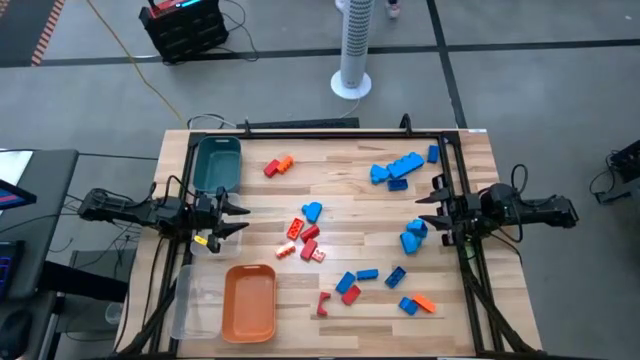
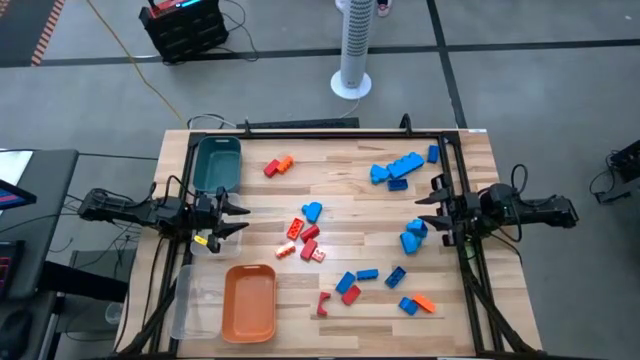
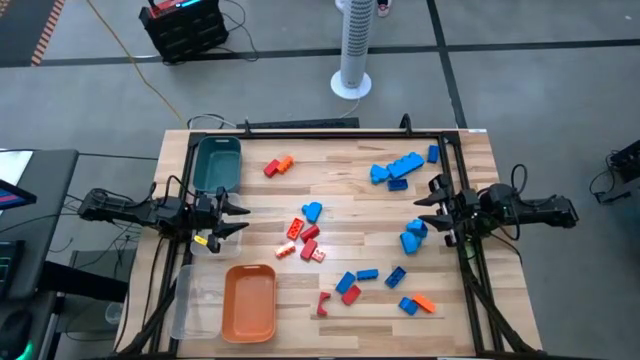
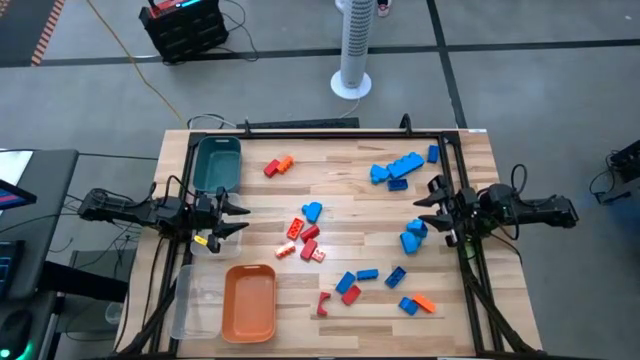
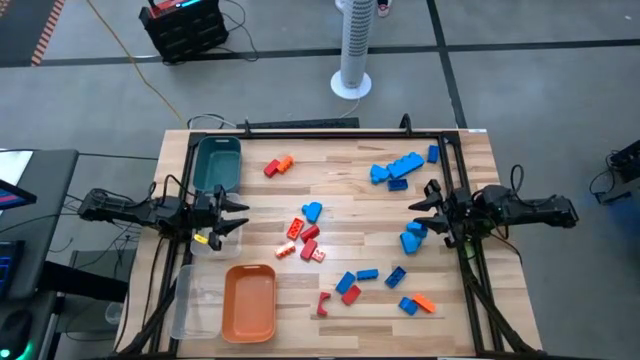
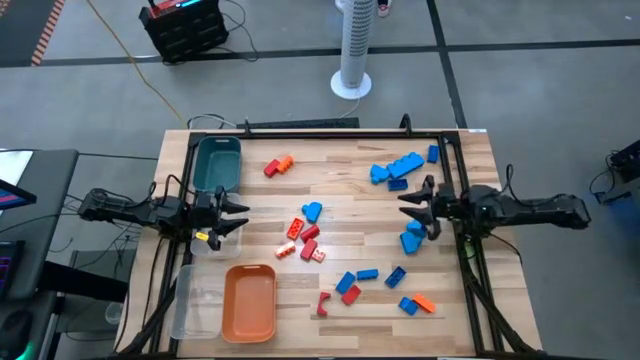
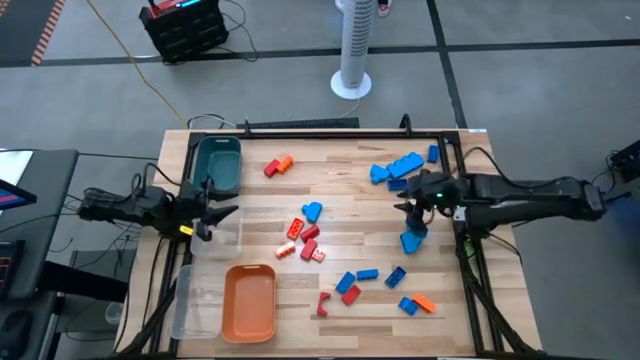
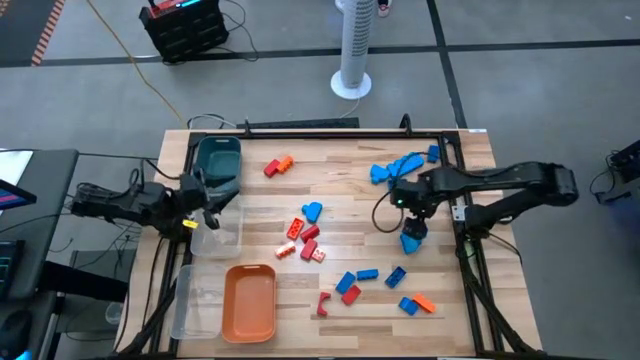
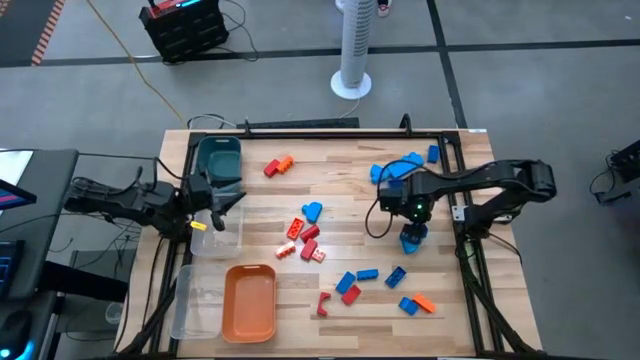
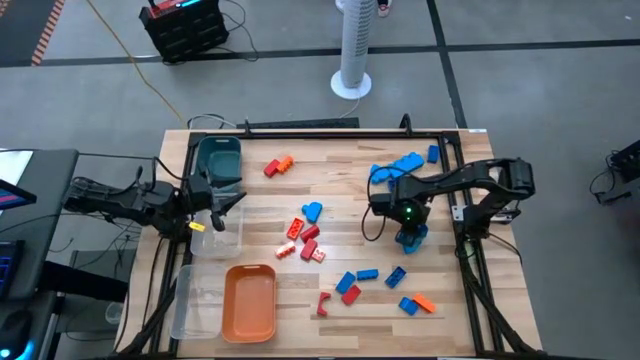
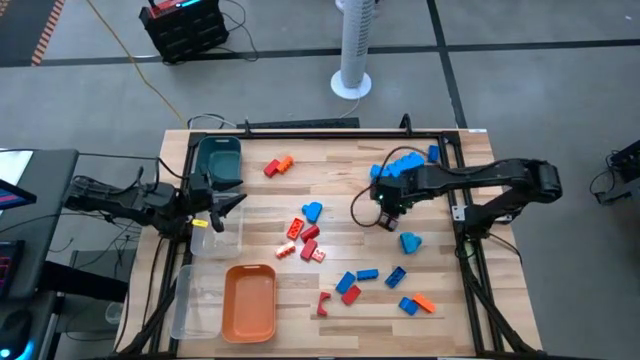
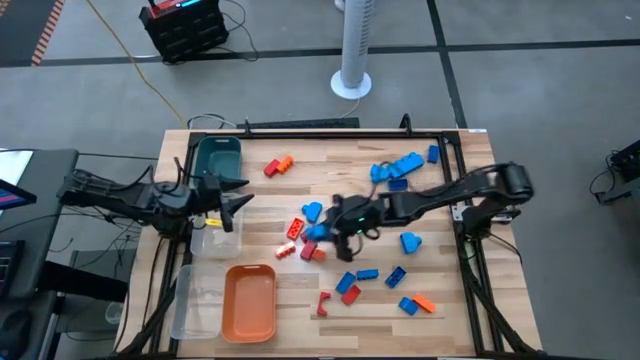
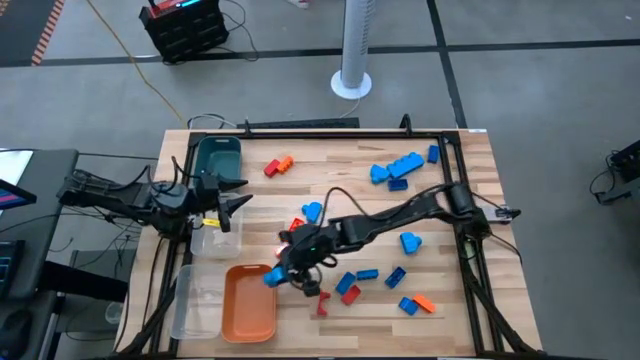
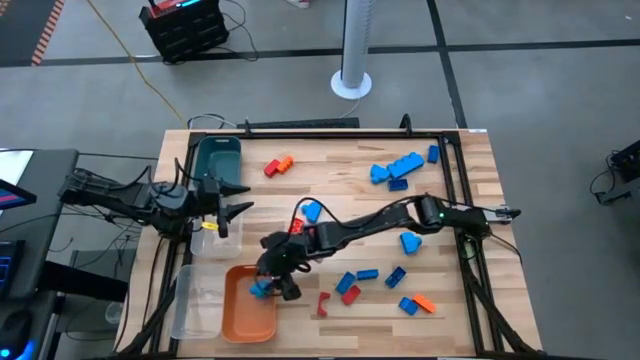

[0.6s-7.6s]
Task: Sort blocks
Put the light blue game piece into the orange bin

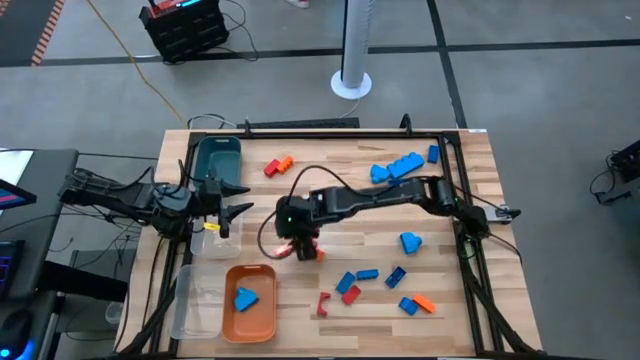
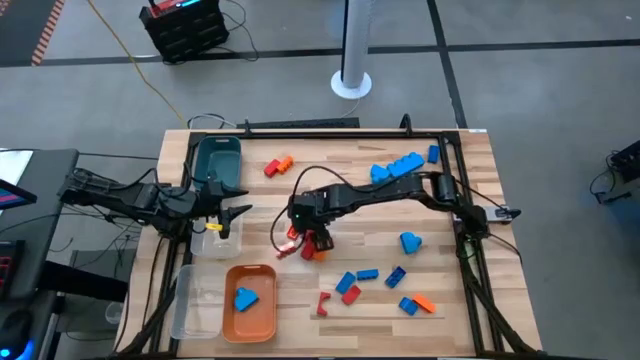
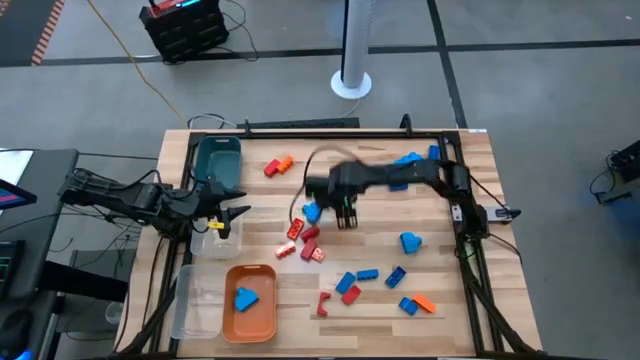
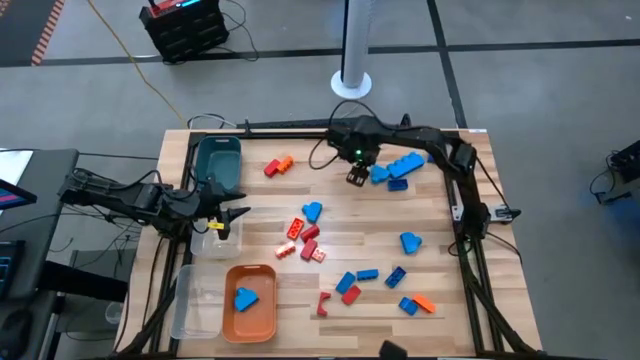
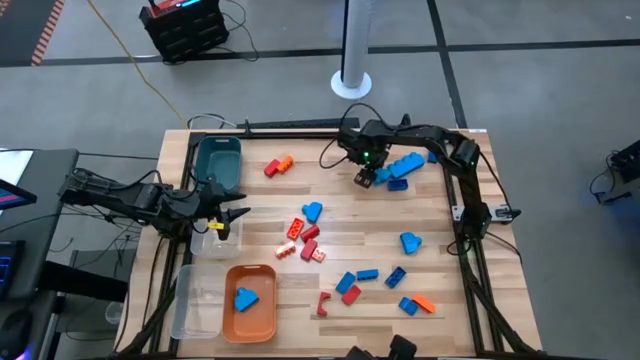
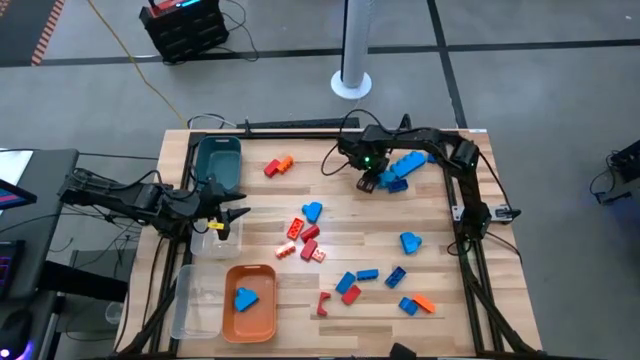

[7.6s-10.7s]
Put the light blue game piece into the orange bin

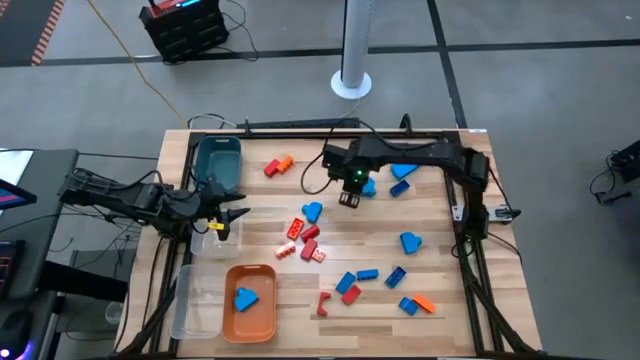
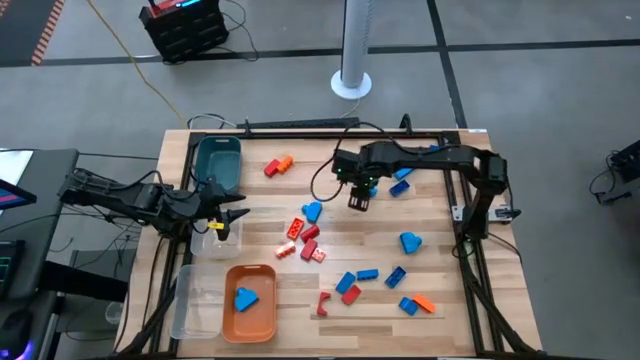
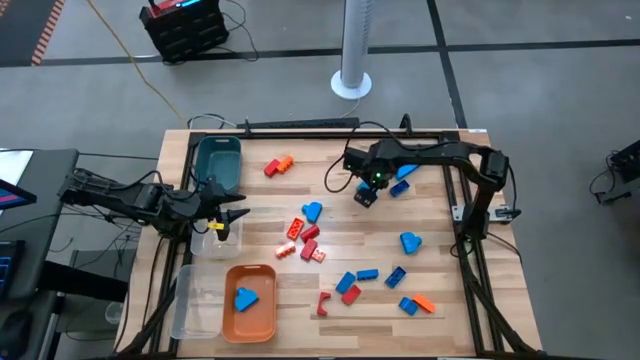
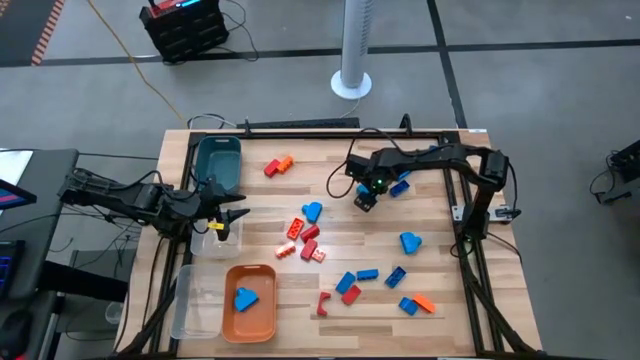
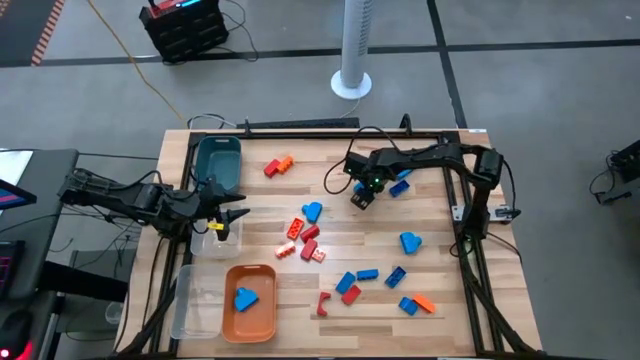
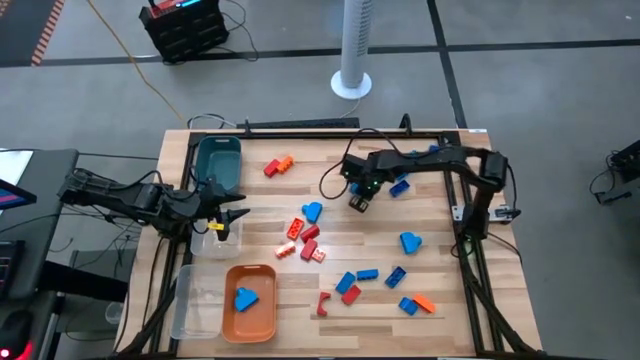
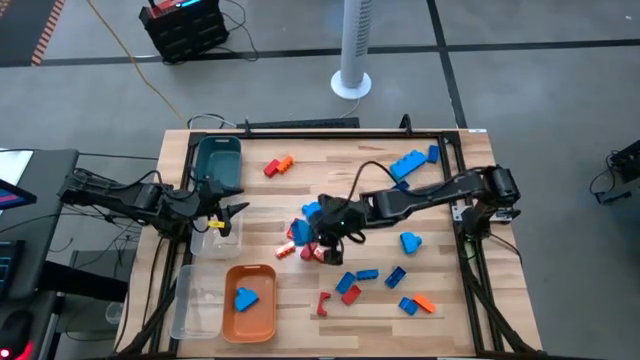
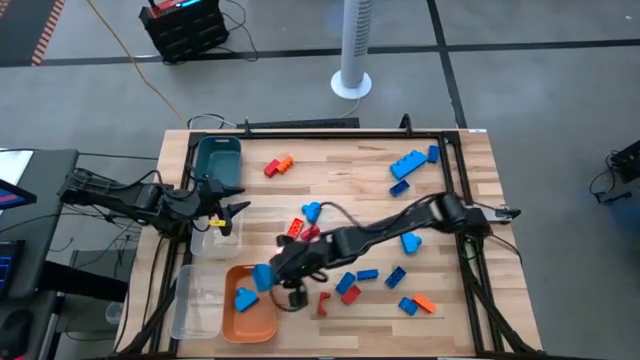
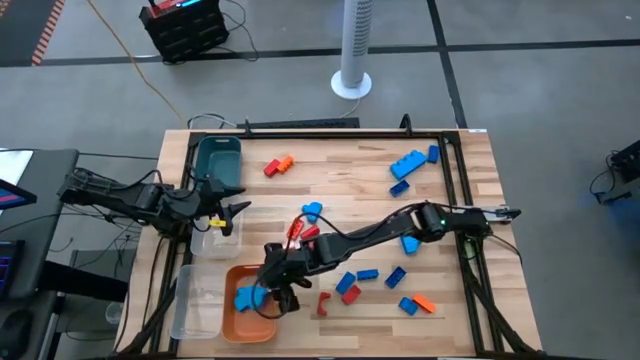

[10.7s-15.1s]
Put the light blue game piece into the orange bin

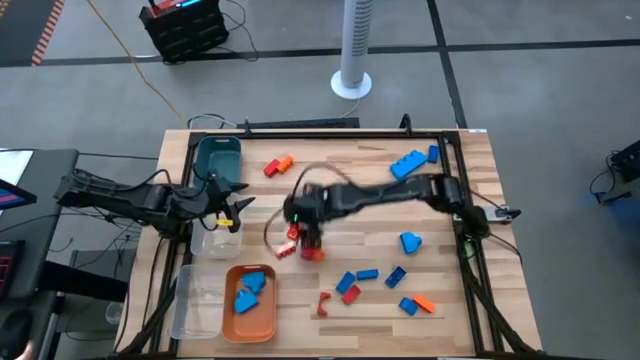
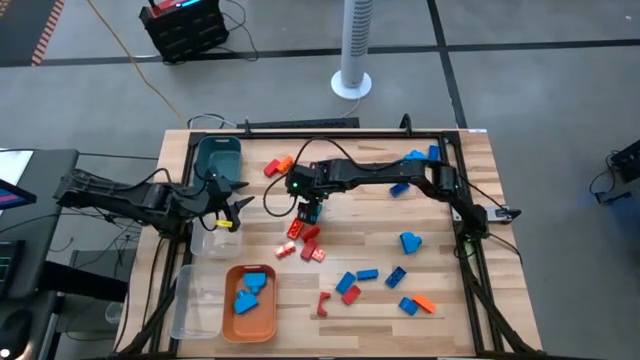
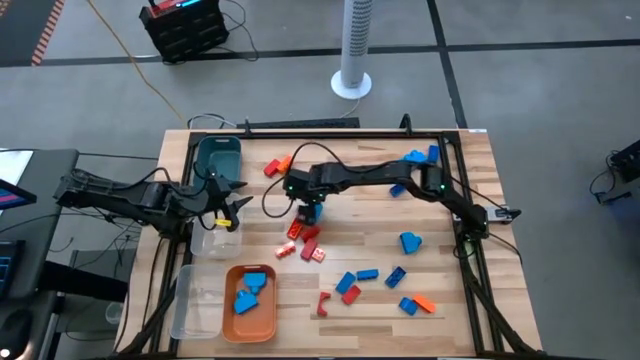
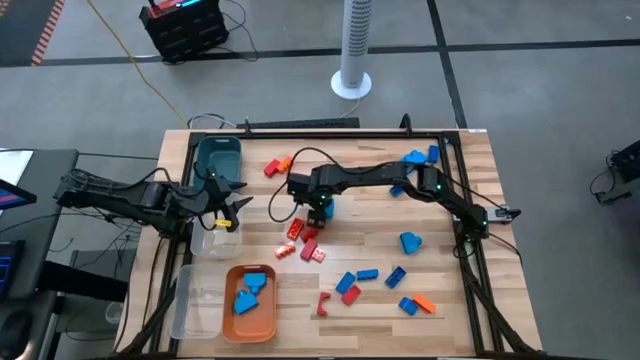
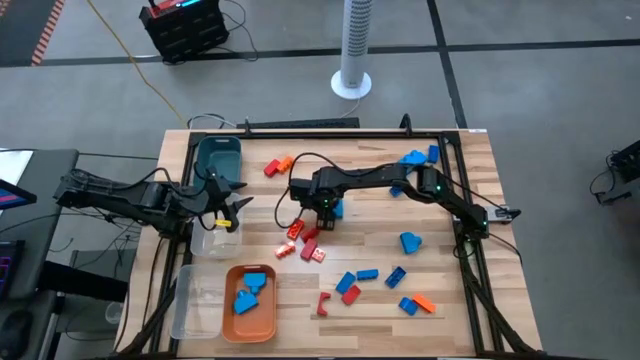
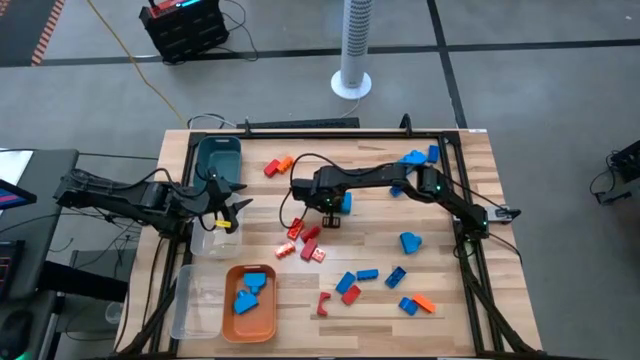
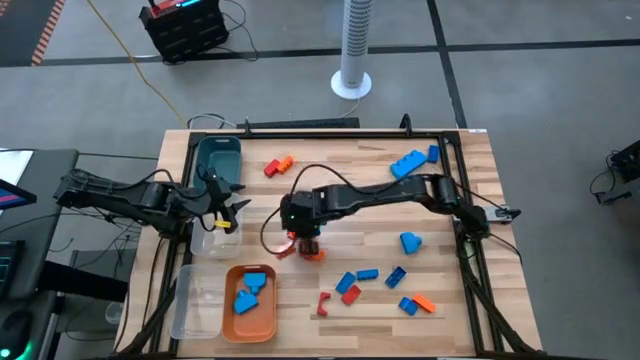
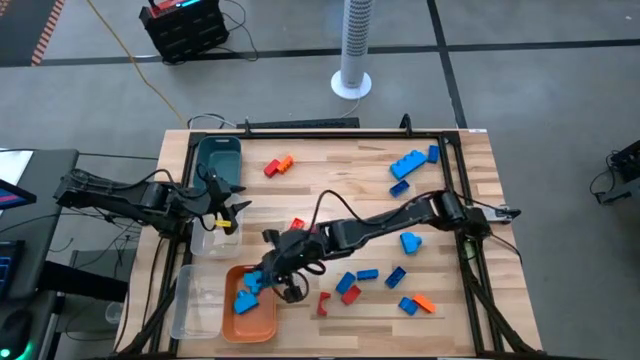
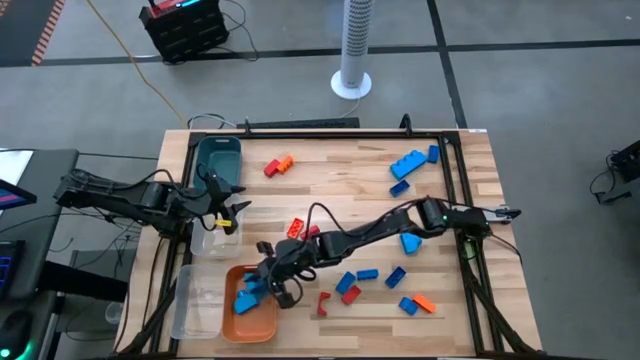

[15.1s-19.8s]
Put the light blue game piece into the orange bin

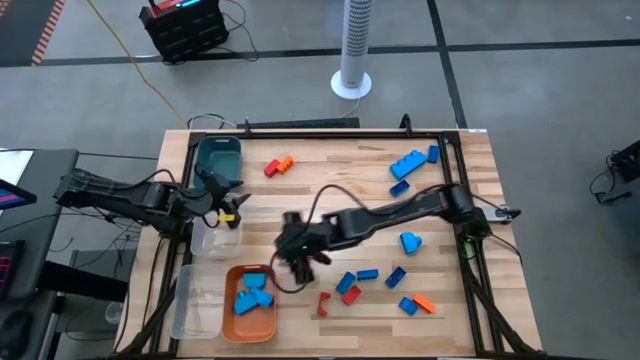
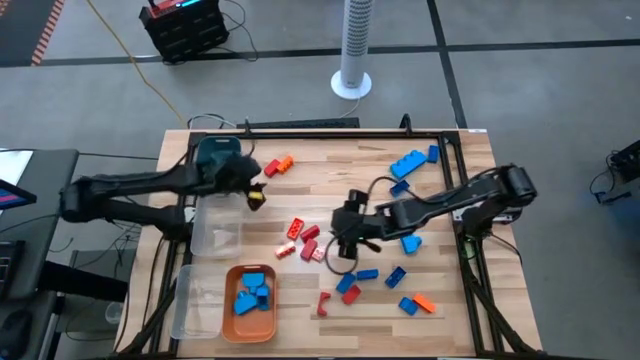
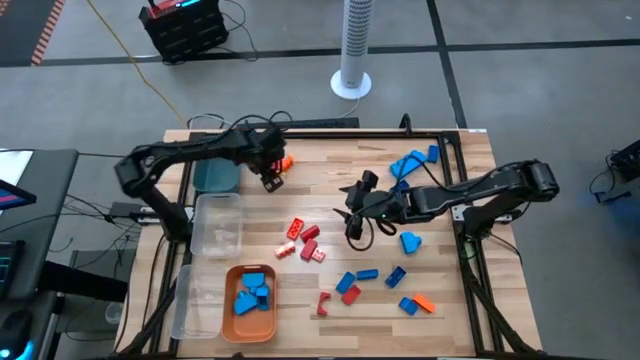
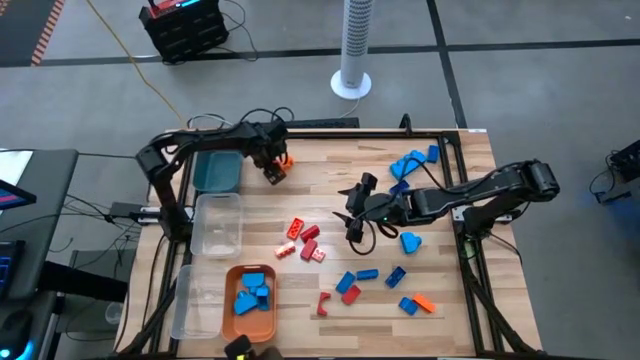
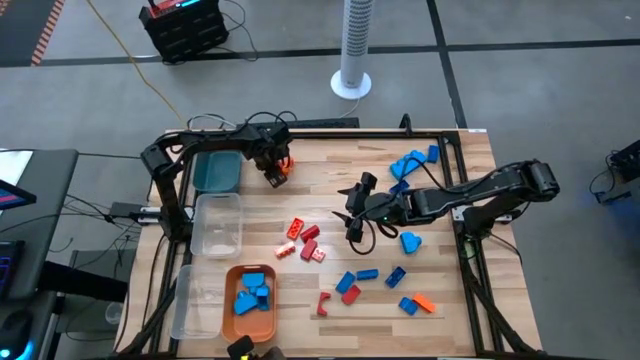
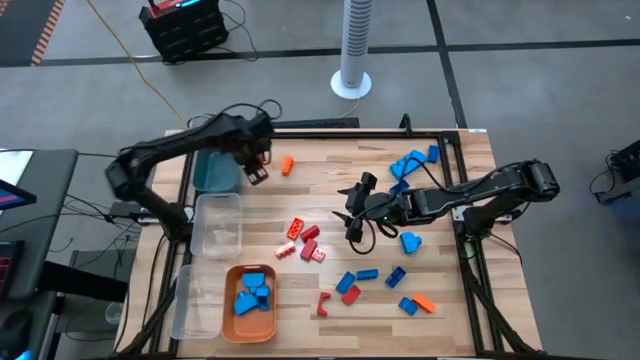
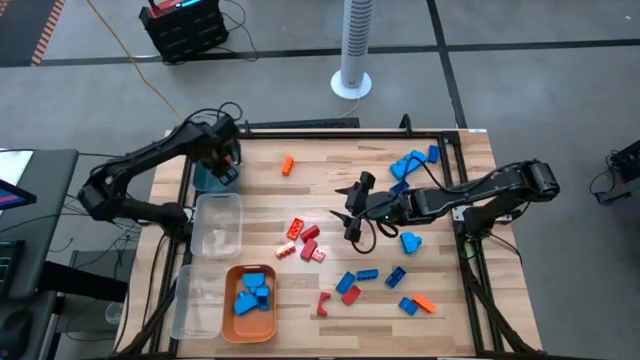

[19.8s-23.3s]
Put the red block into the blue bin
